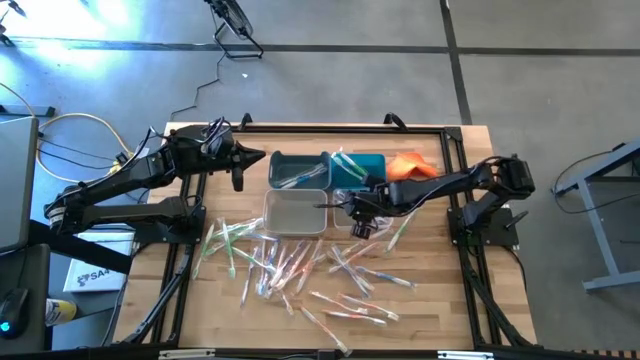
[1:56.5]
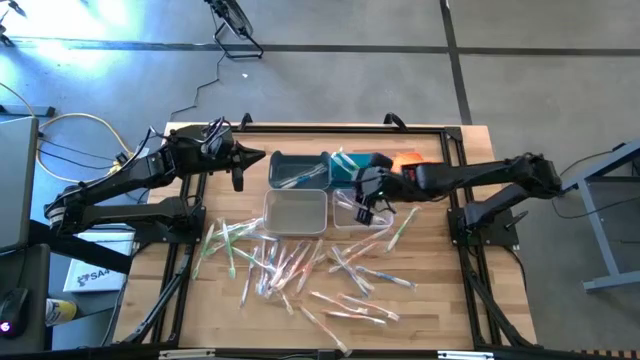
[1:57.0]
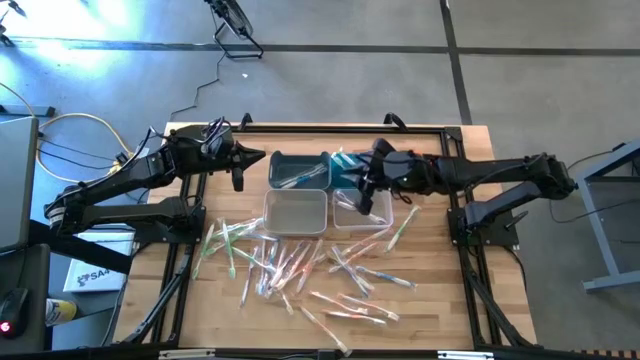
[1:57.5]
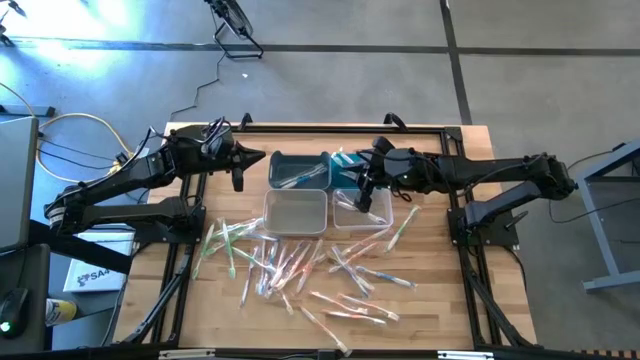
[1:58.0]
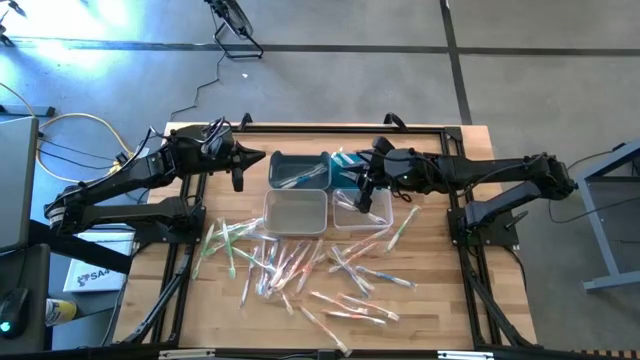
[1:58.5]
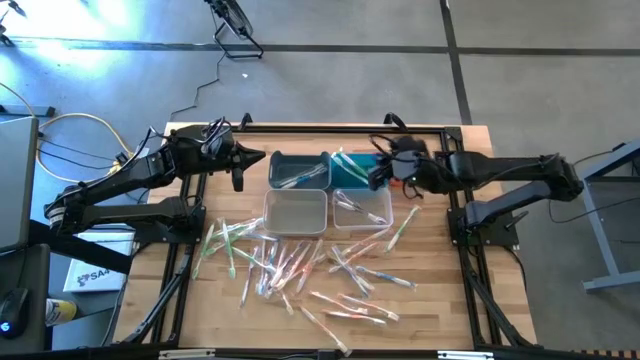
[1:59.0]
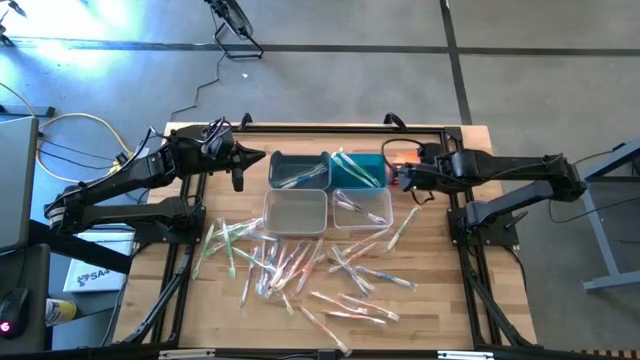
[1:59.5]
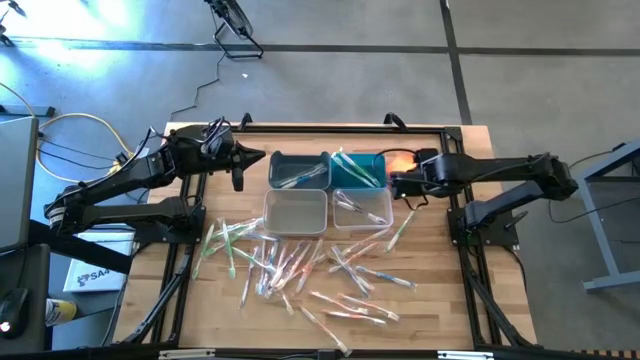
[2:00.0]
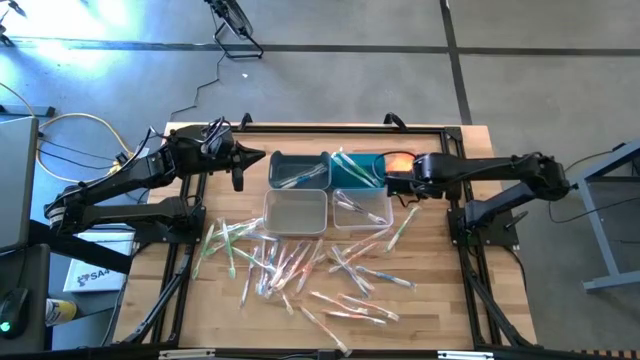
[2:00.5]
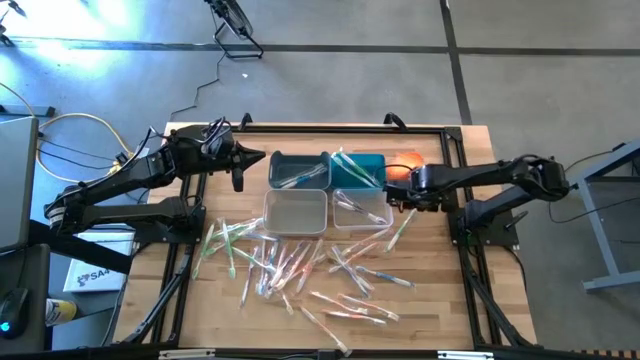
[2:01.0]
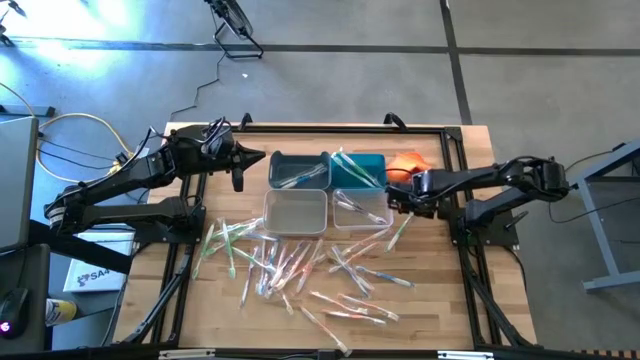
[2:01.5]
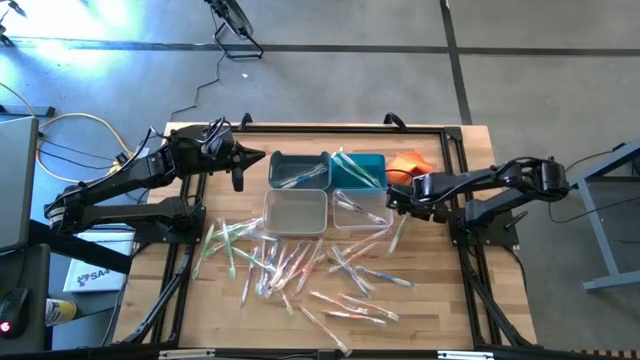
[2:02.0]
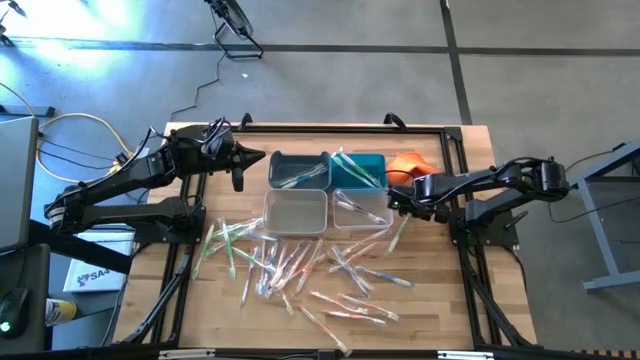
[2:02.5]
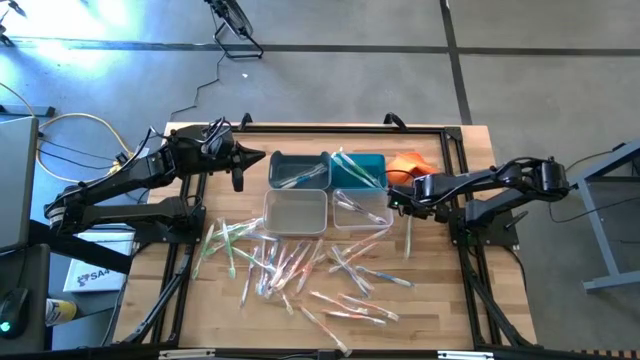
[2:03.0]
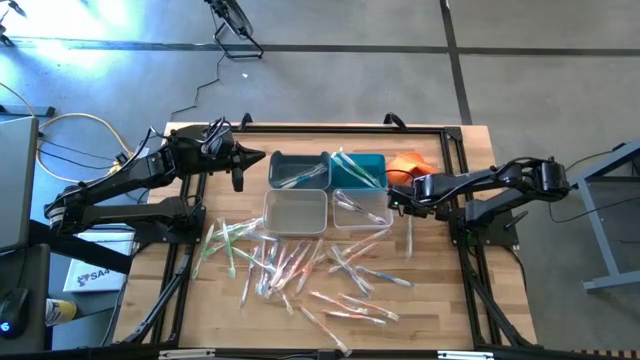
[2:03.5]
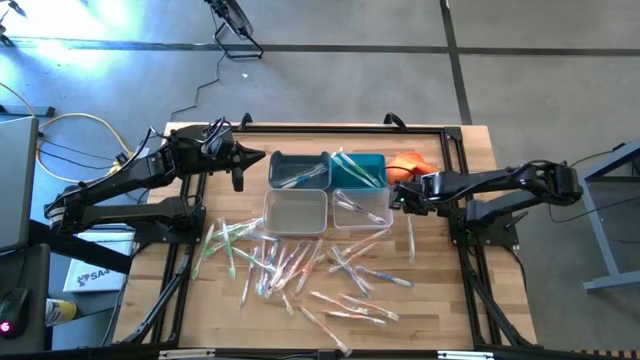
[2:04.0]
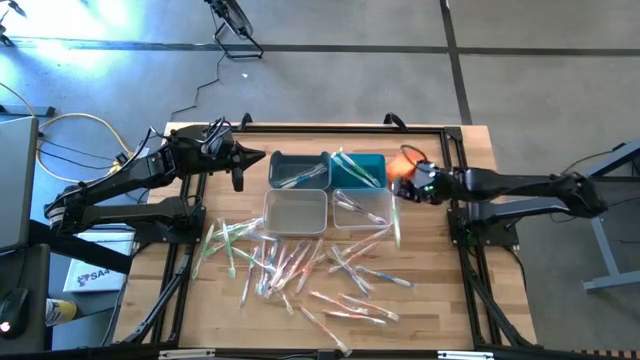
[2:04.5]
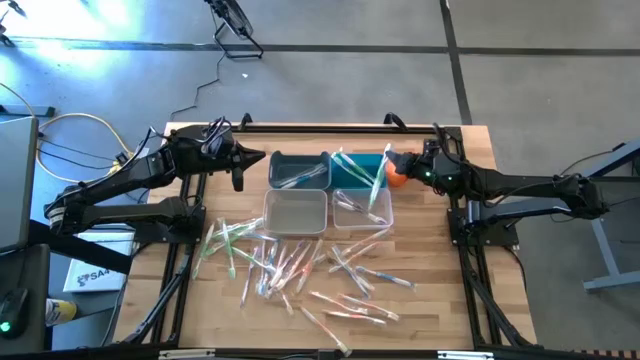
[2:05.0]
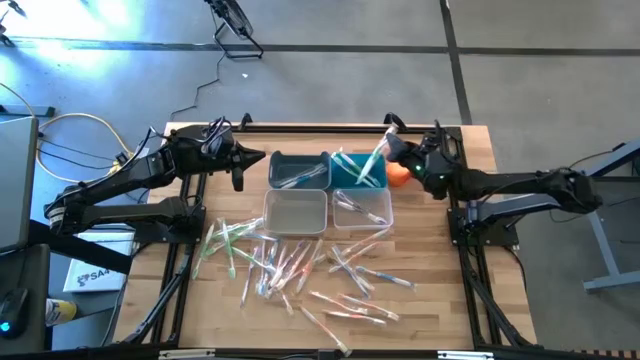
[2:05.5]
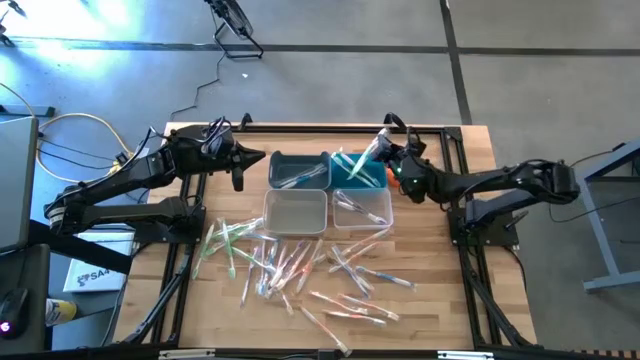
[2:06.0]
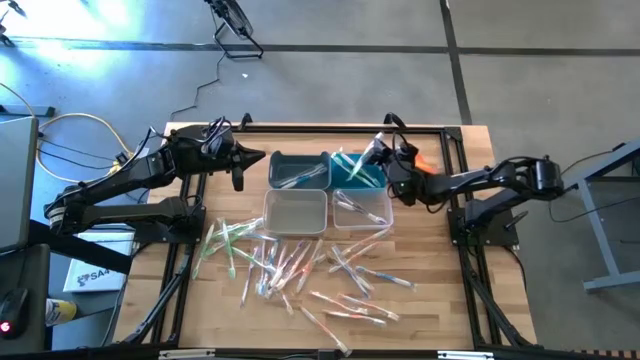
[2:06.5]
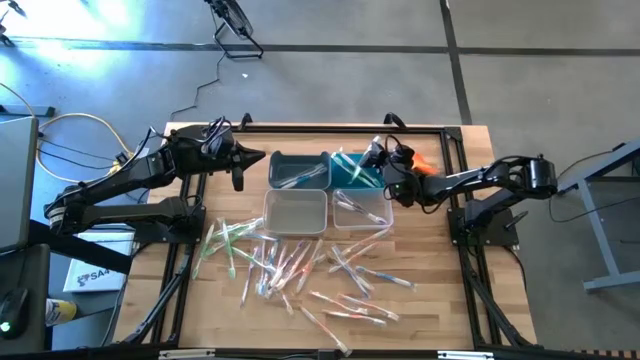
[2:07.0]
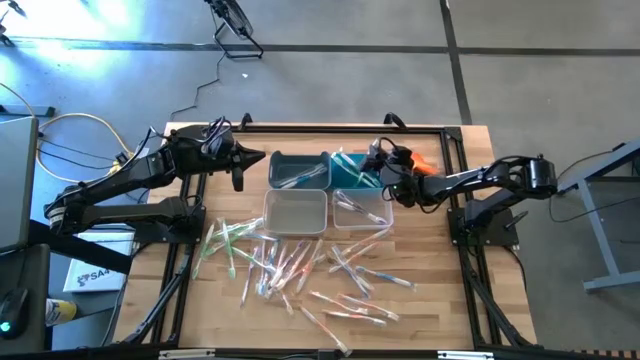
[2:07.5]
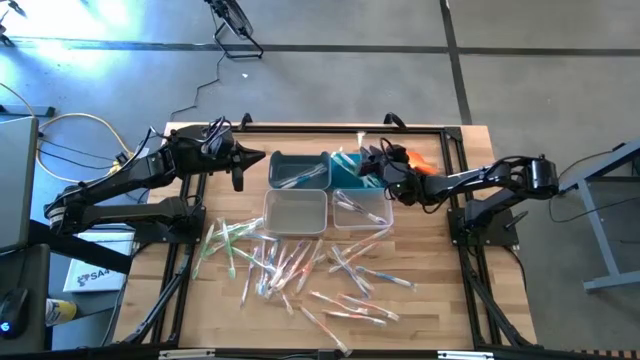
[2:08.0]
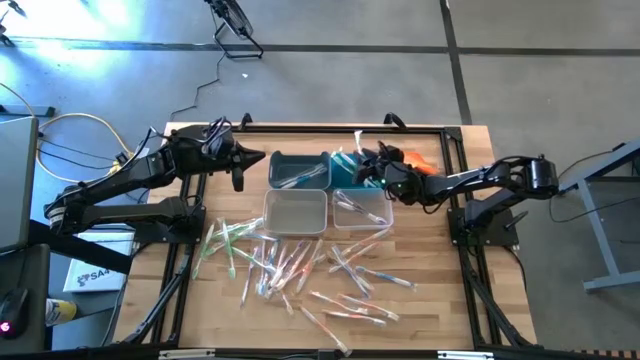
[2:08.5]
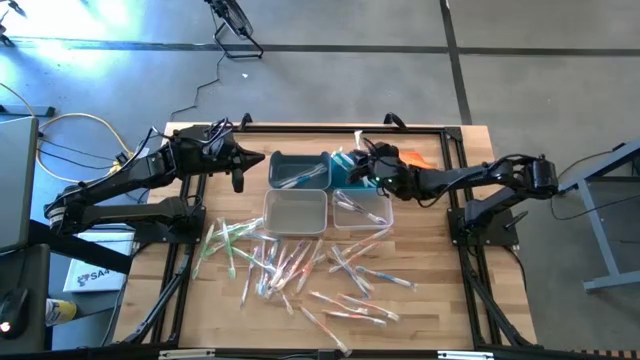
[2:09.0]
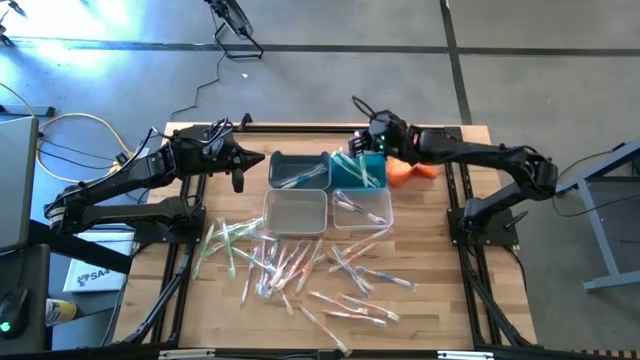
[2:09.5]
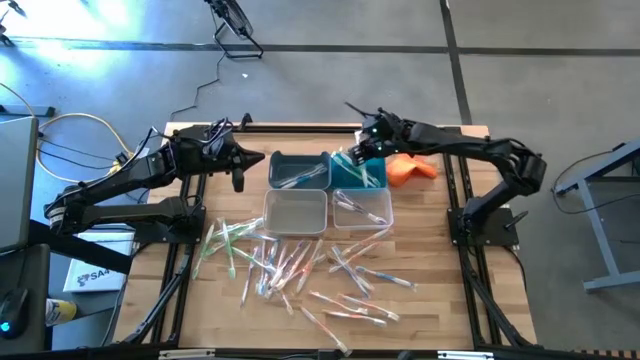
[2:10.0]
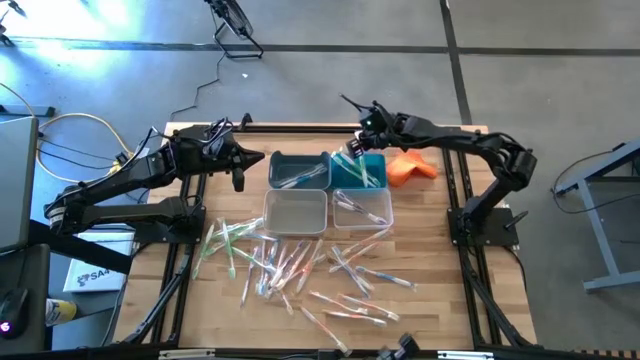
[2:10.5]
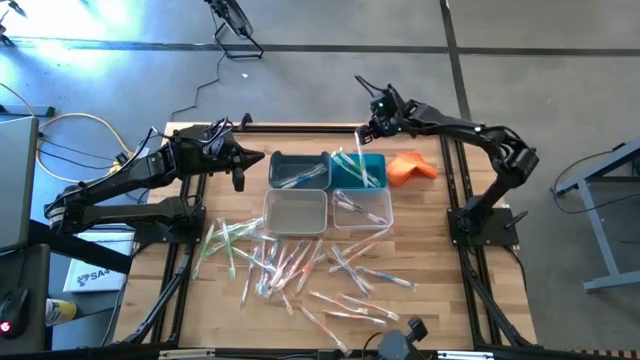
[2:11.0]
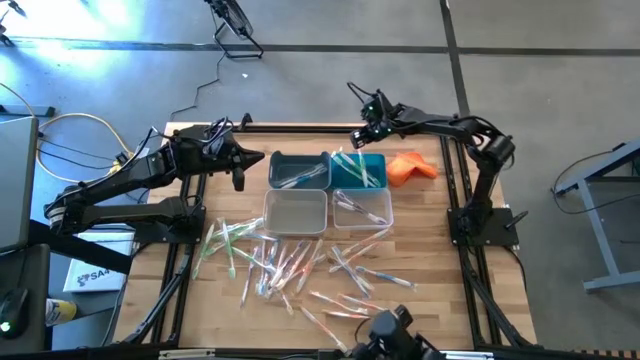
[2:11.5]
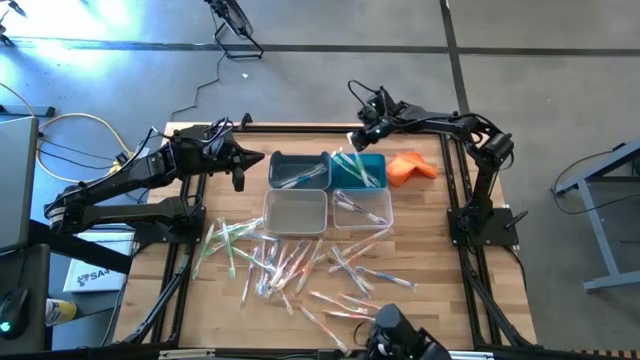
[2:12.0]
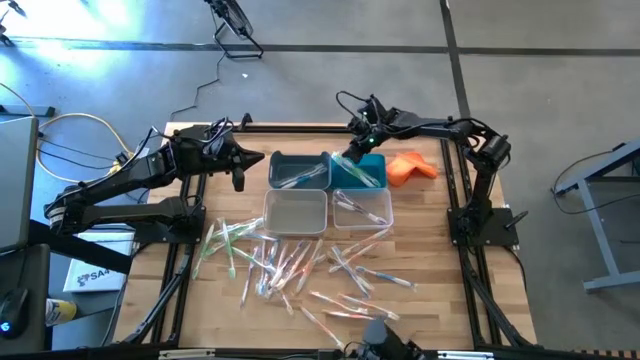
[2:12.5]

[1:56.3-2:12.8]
Task: Pick & Place Toothbrushes
Put the green toothbrush into the blue bin

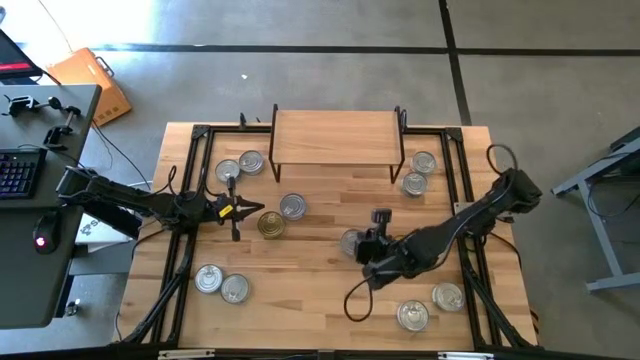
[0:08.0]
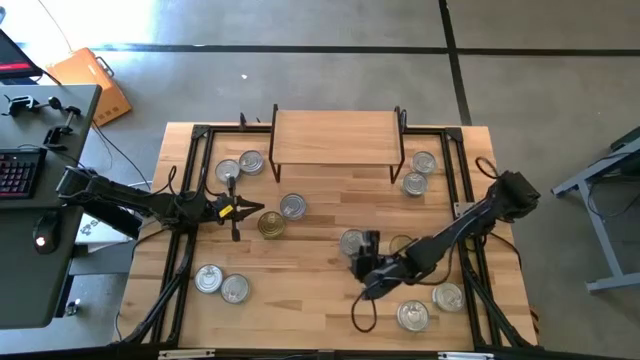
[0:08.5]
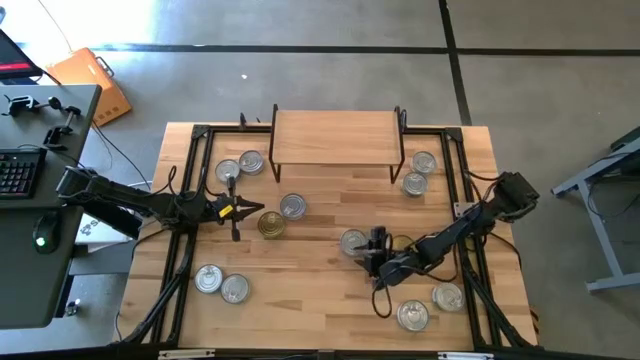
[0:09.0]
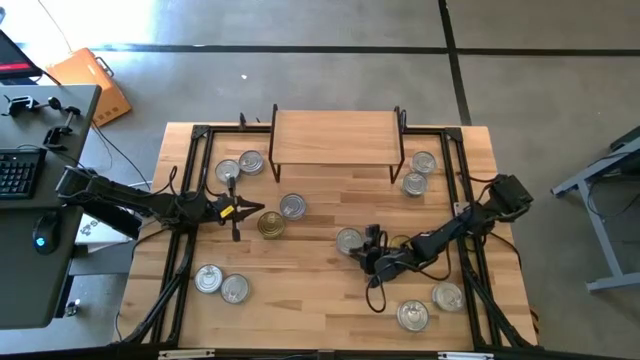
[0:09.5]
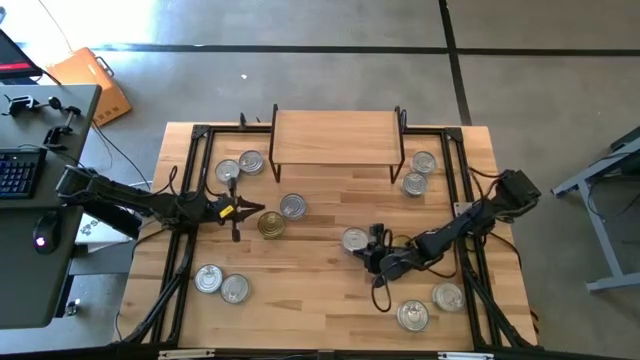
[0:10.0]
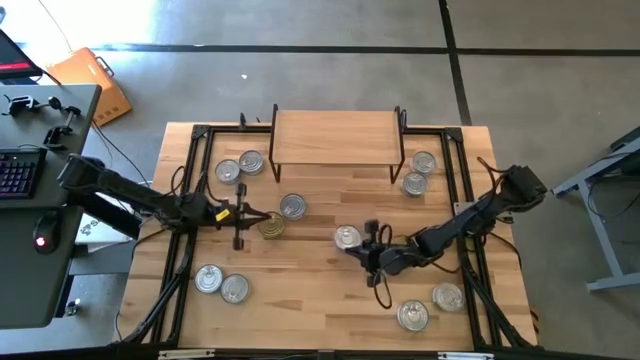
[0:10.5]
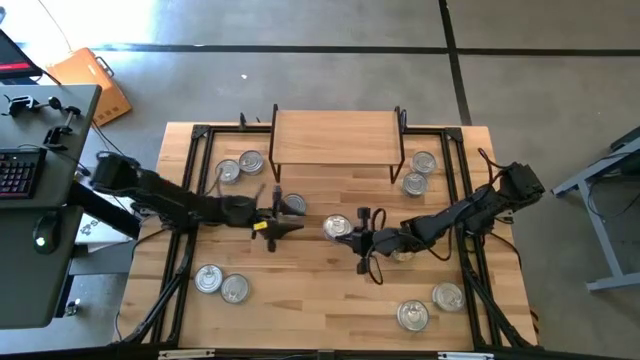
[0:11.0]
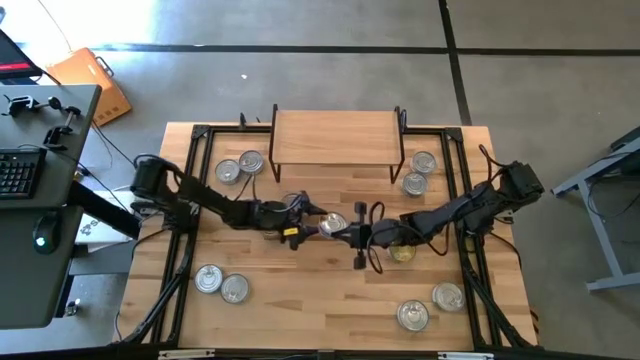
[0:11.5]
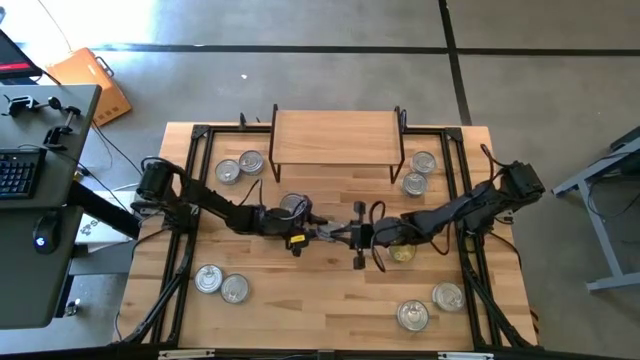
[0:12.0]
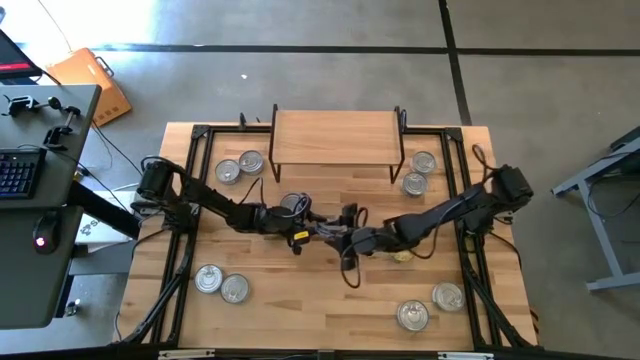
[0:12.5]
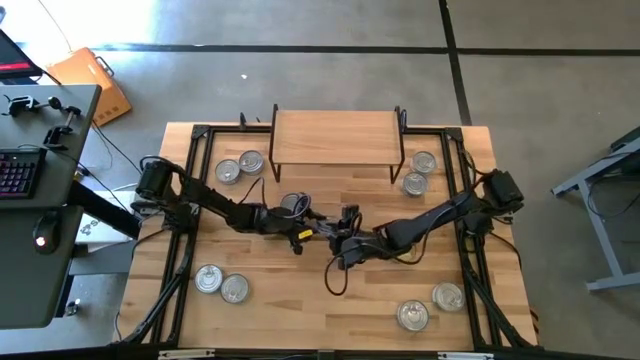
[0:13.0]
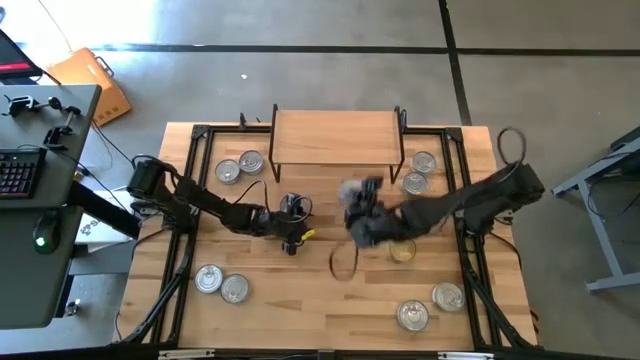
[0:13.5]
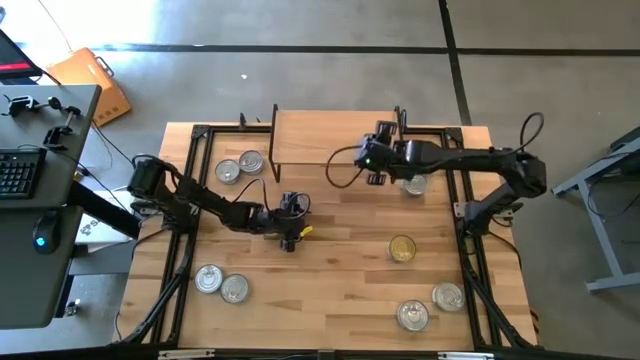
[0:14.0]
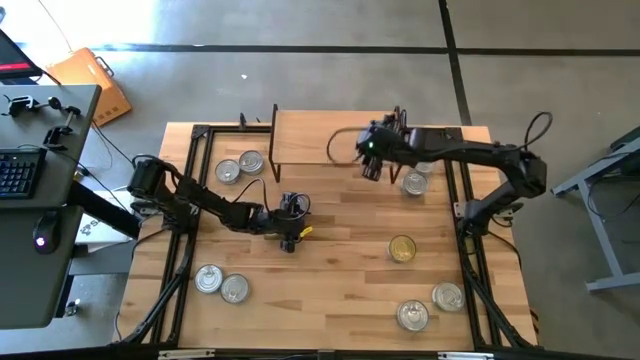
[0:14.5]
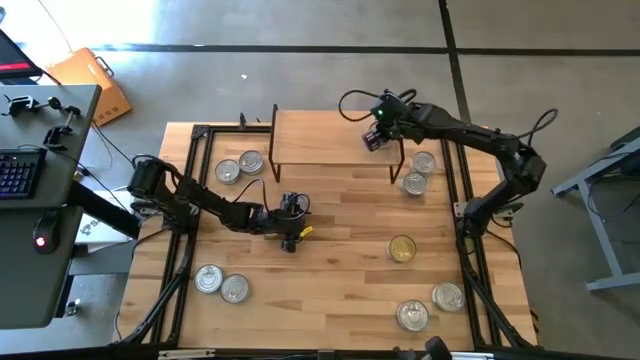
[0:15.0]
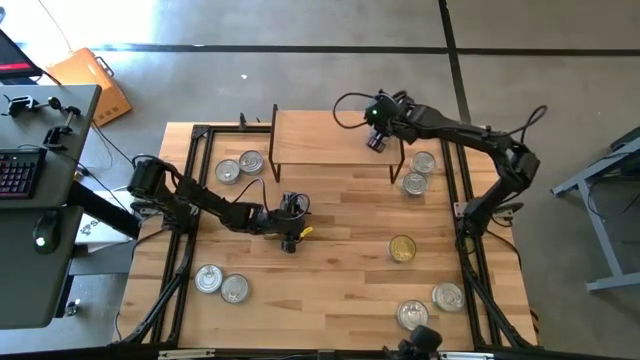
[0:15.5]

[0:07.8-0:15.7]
Task: Stack canned seafood by type on shelf
Put the blue tuna can on the shelf
